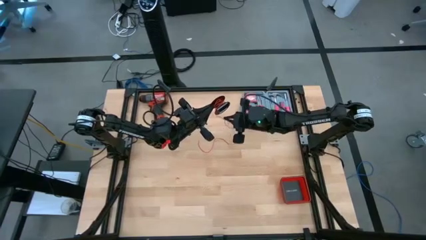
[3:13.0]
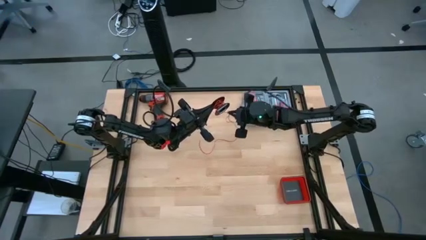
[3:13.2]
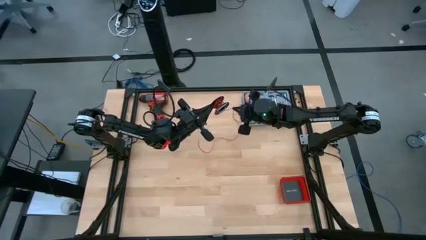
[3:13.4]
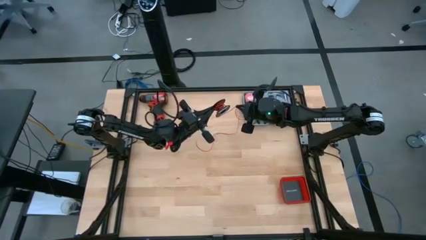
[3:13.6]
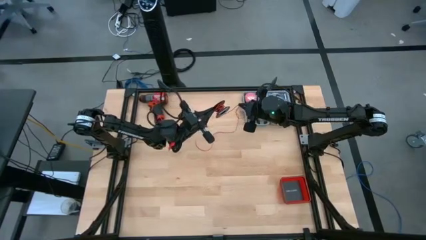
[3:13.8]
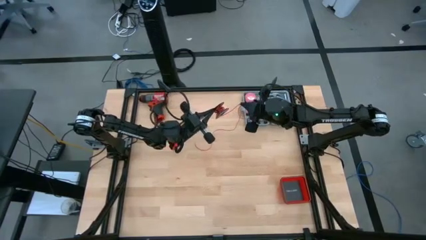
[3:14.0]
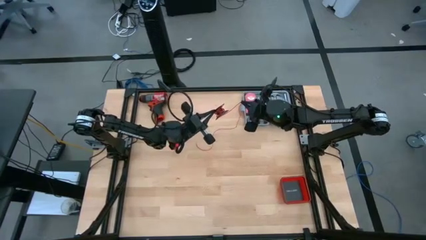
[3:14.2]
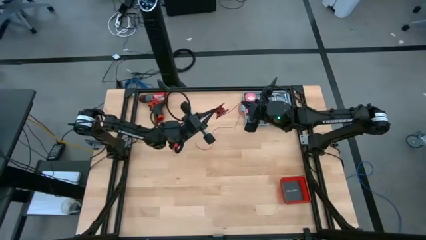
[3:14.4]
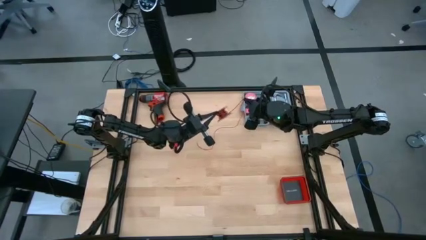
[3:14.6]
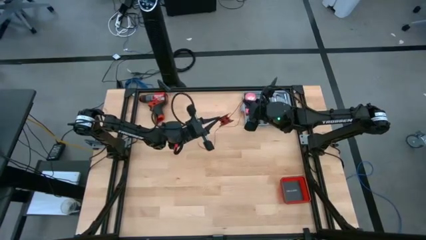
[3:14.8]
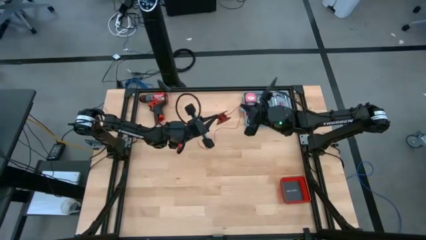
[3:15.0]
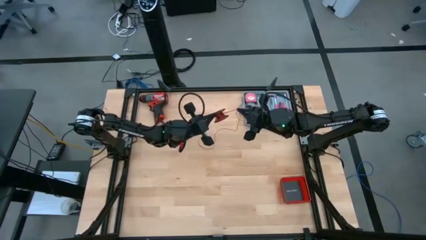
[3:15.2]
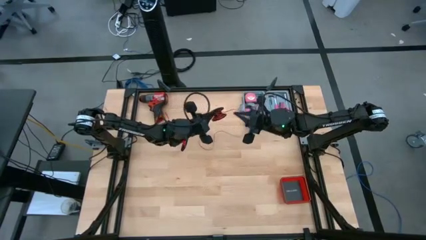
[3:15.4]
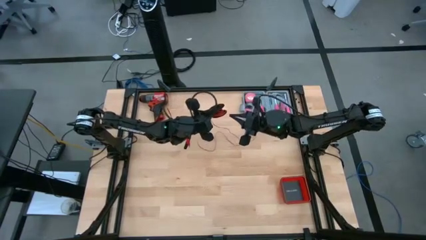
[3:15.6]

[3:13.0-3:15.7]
Task: Coil cords
Coil the red wire on the black spool

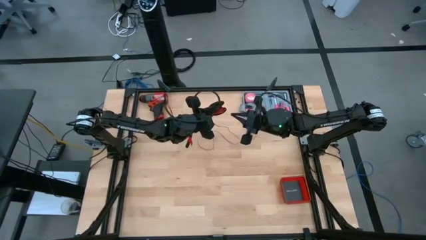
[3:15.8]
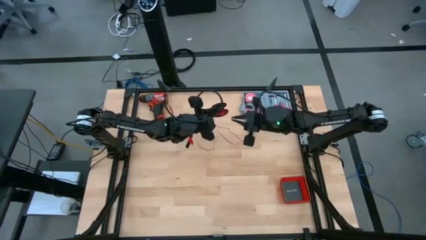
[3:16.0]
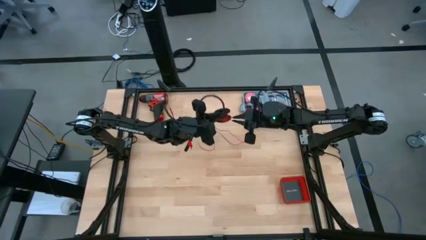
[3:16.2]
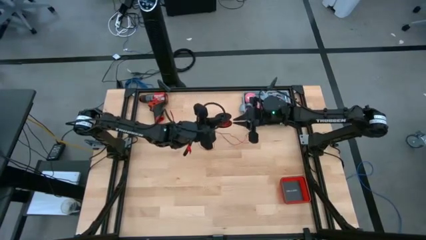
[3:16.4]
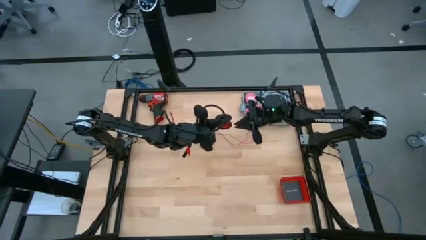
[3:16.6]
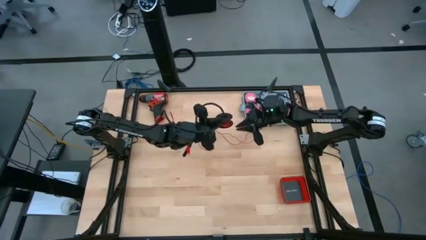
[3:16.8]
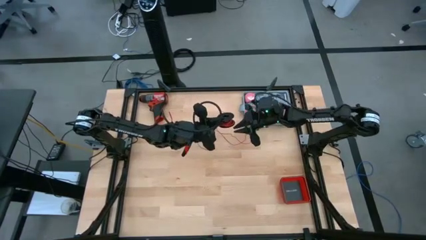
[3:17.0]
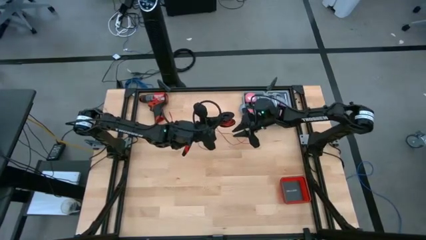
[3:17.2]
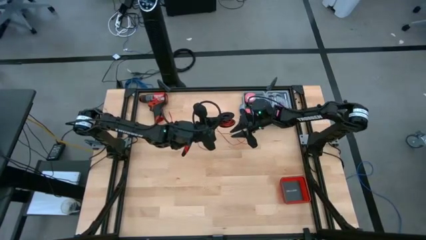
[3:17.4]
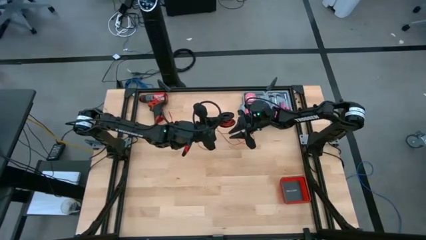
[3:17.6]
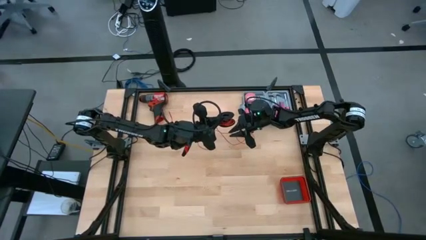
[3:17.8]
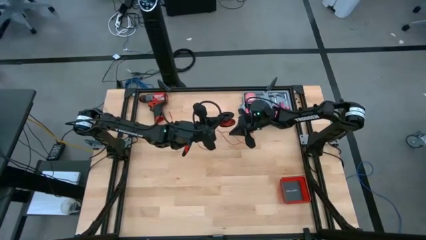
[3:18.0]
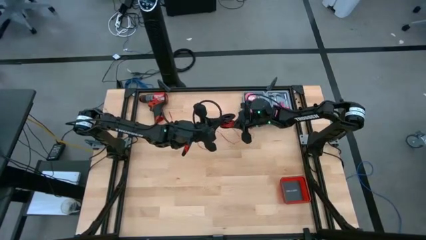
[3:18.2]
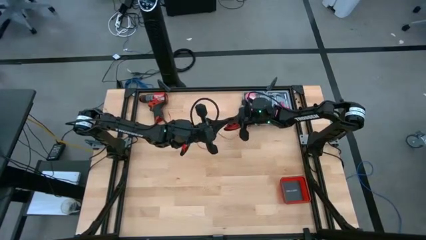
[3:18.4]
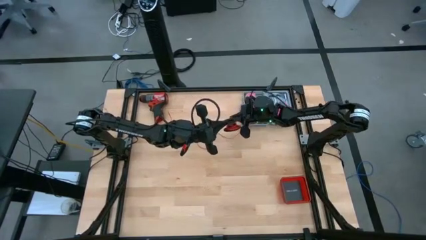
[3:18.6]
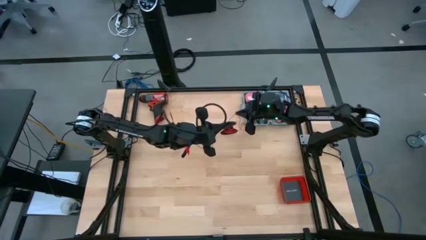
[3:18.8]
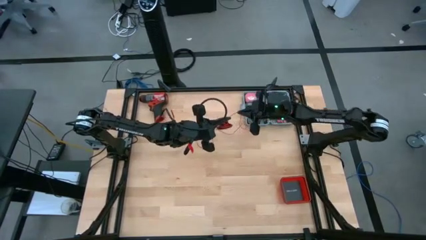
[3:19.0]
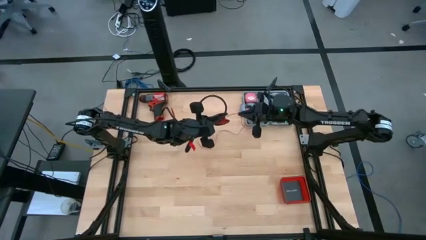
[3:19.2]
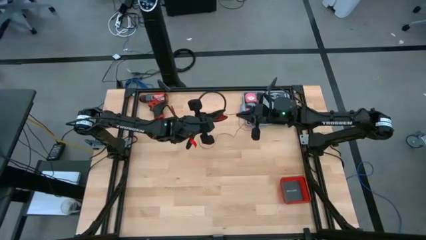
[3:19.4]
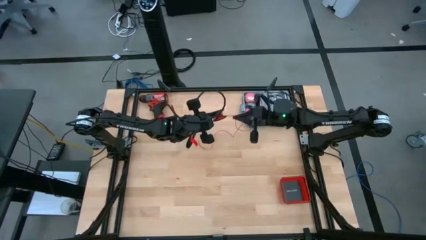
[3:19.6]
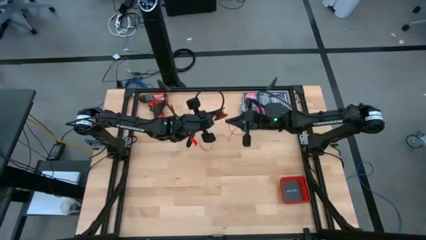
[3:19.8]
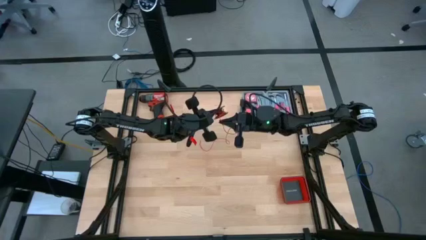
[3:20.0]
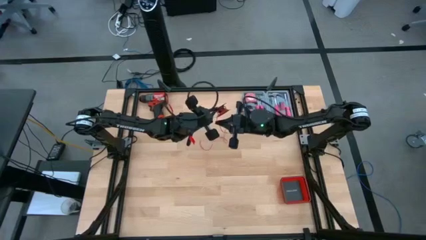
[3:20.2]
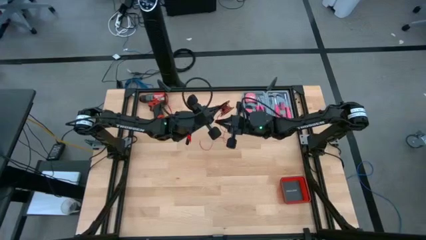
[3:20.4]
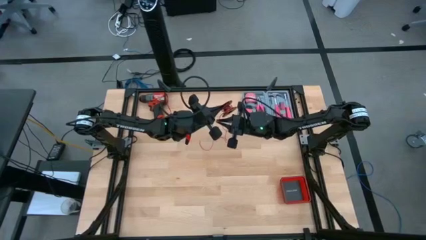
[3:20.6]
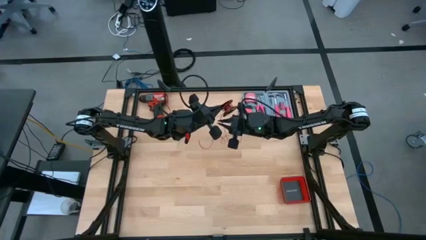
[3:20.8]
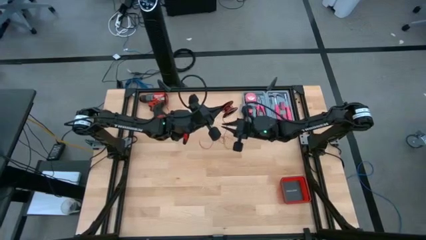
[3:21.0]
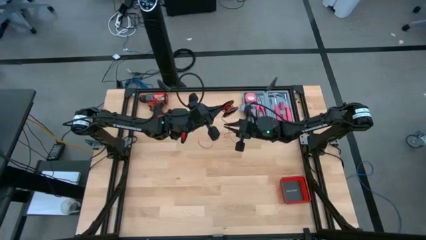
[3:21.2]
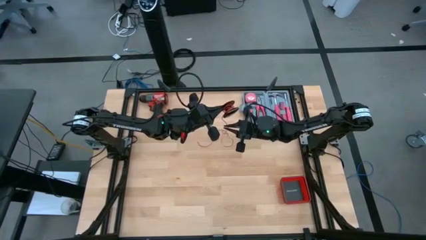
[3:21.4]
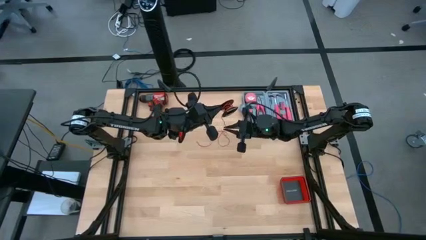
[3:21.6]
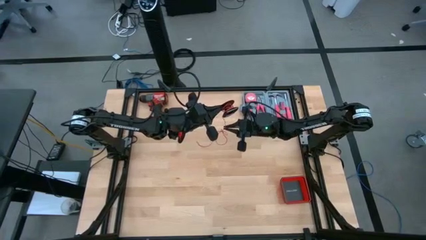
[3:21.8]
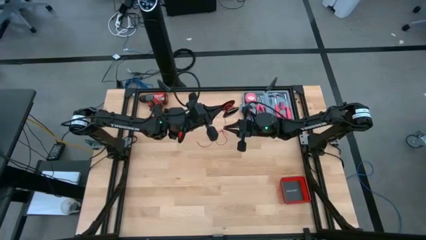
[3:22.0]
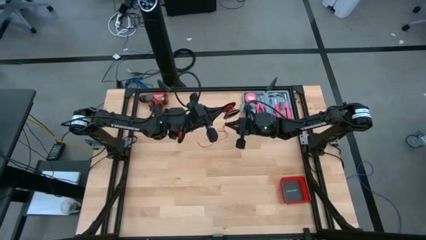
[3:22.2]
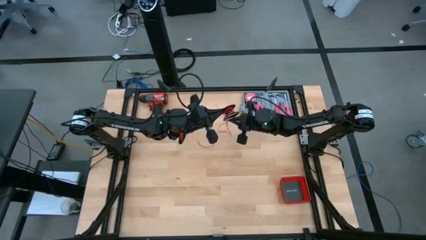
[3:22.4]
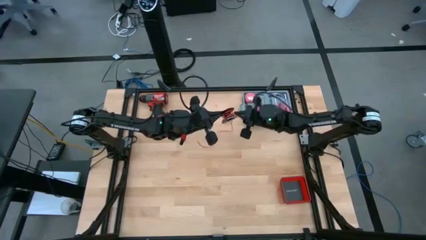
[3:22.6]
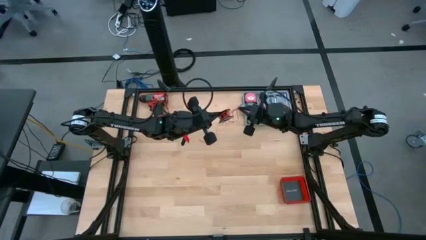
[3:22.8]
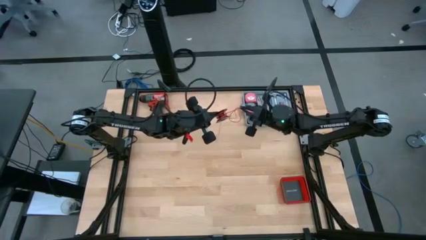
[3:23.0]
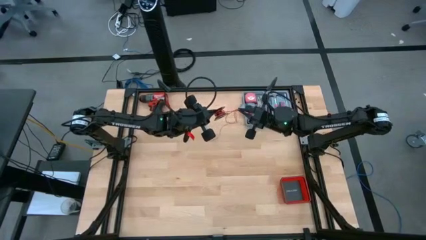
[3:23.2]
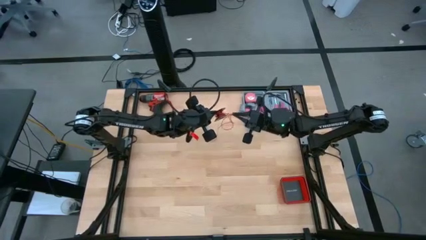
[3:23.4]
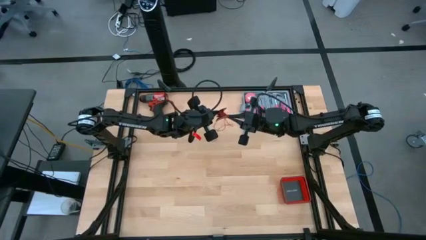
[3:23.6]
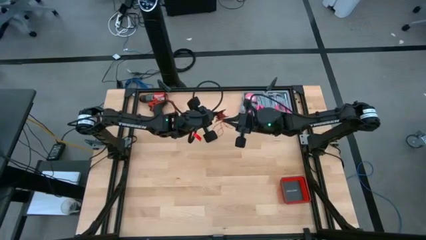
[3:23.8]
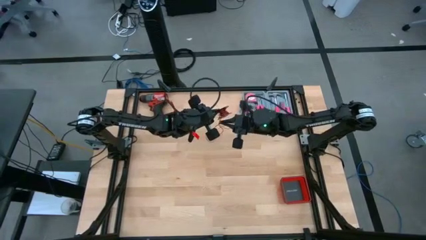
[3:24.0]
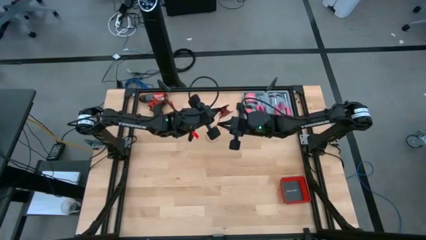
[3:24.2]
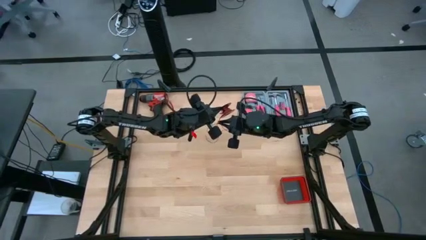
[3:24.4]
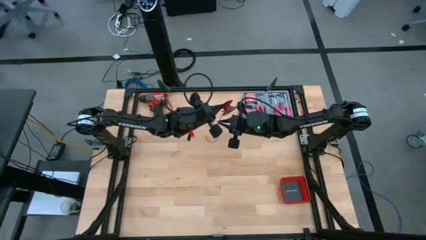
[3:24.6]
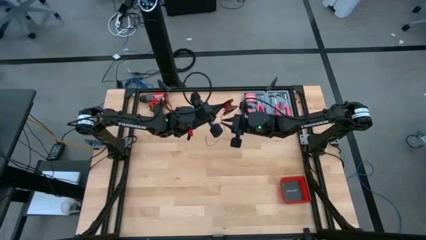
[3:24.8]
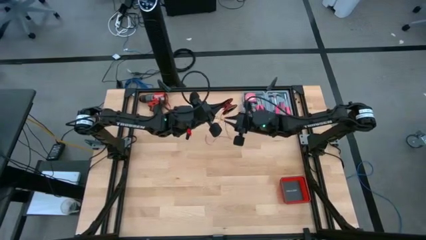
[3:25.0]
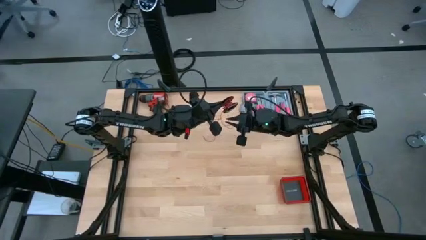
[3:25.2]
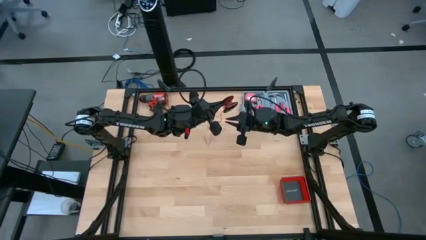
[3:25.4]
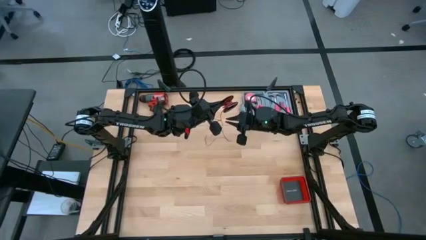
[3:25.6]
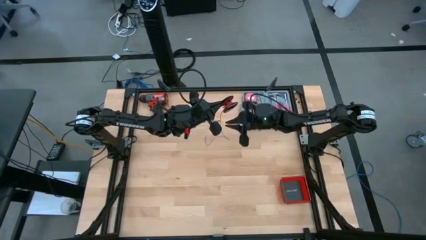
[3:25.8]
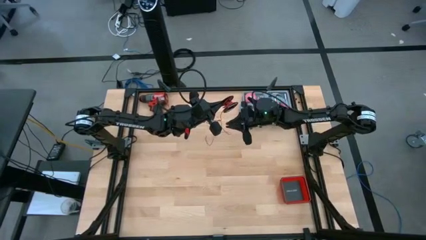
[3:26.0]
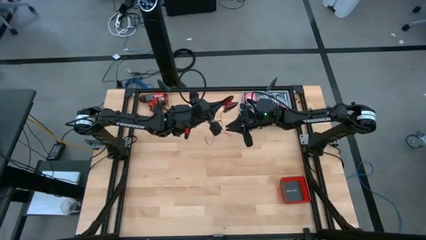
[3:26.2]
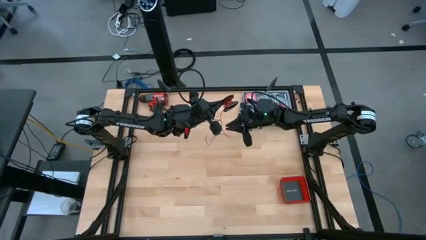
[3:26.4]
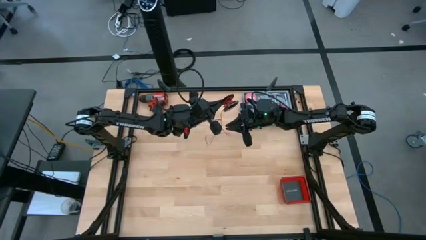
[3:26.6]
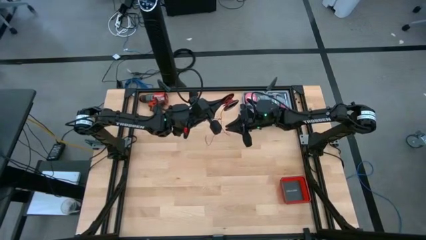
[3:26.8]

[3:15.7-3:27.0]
Coil the red wire on the black spool

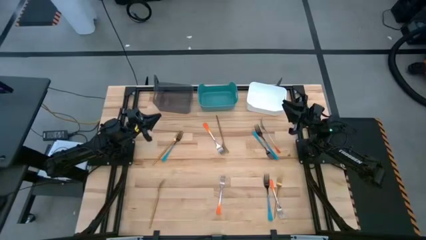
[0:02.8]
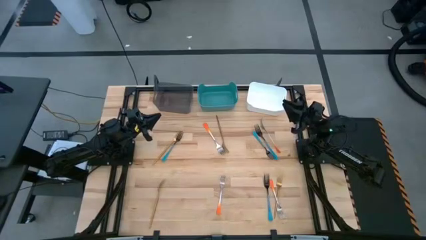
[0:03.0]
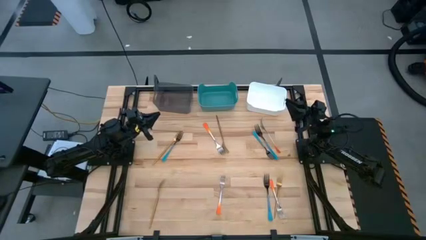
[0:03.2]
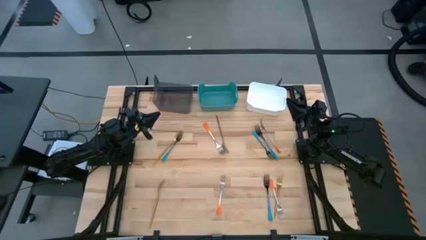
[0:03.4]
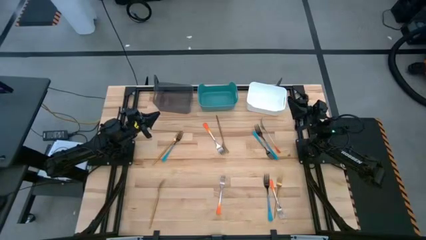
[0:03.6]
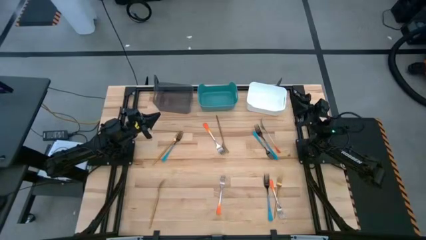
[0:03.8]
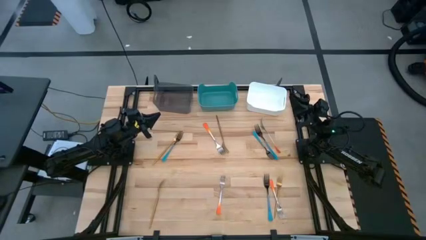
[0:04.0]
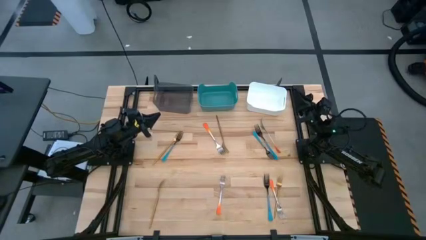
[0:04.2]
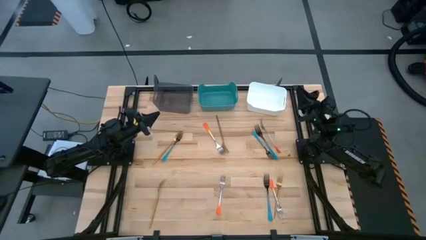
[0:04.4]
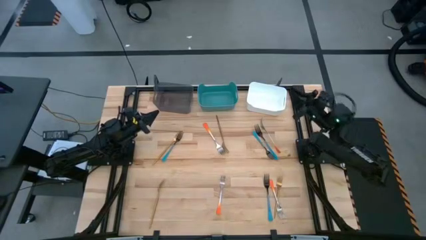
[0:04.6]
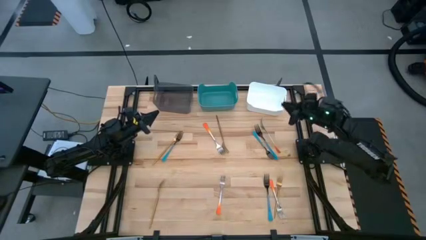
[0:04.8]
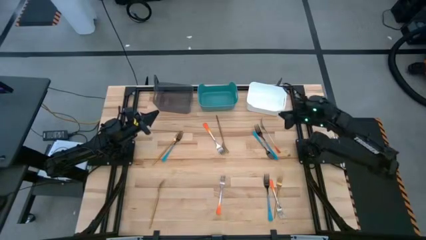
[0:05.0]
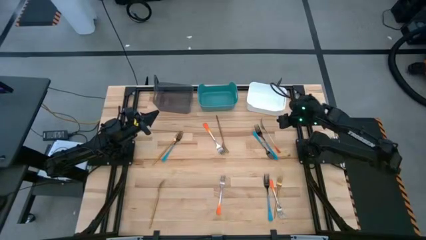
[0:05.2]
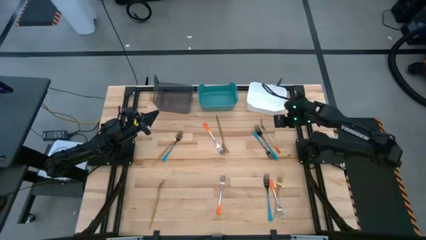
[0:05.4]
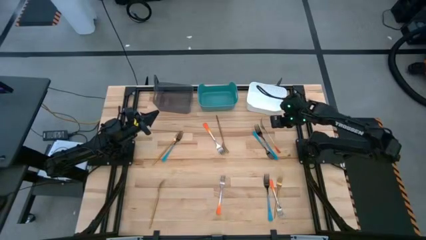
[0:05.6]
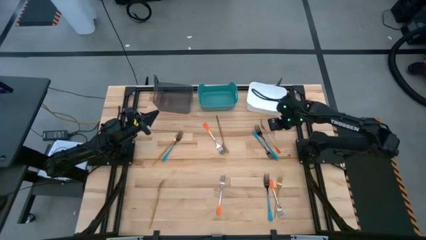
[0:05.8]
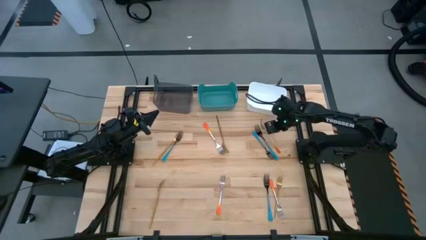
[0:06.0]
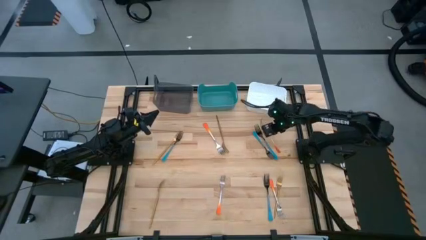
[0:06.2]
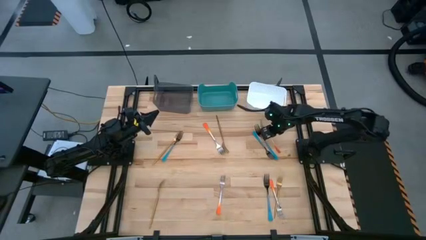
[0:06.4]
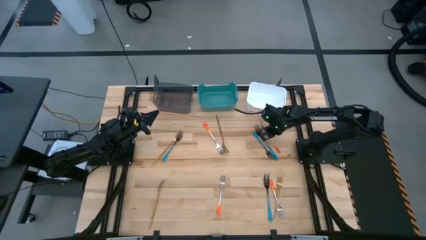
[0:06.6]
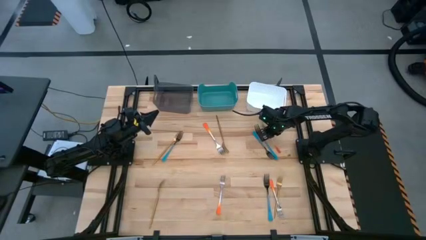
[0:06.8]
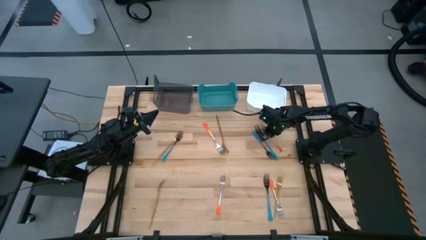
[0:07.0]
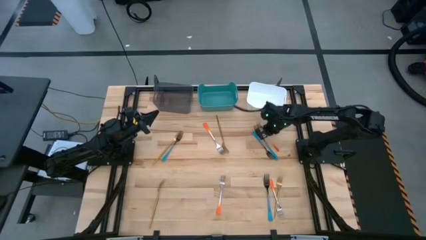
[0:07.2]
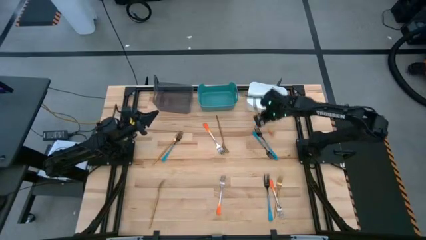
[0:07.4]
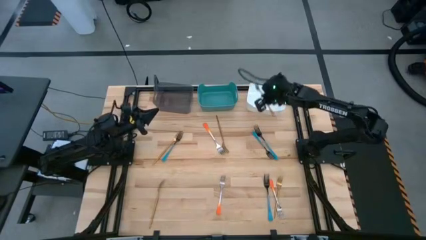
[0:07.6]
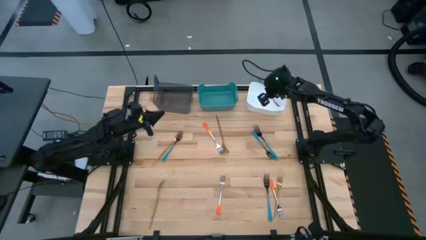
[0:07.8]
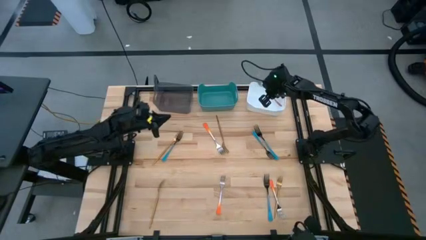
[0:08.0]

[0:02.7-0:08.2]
Task: Sort silverware by color (type)
Put the orange fork into the white bin
